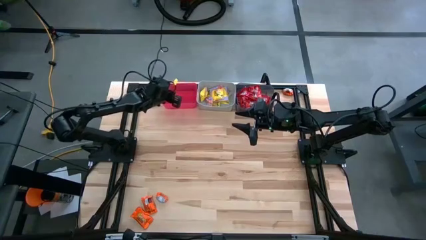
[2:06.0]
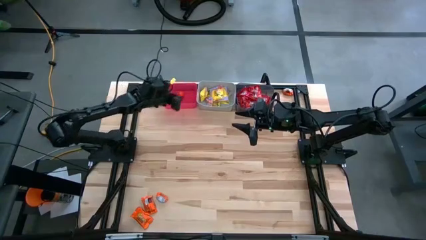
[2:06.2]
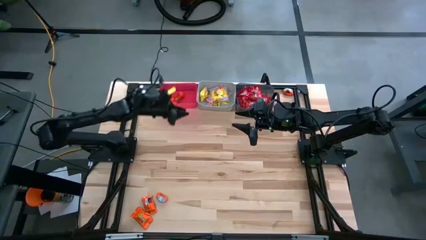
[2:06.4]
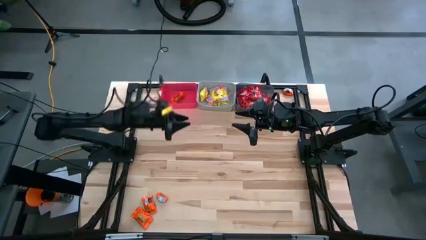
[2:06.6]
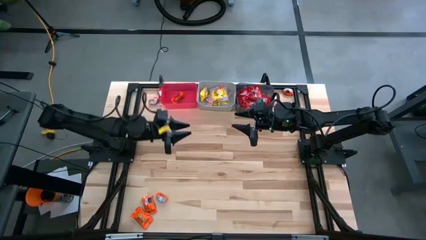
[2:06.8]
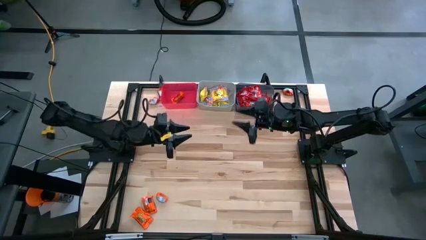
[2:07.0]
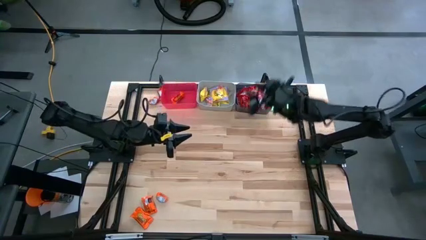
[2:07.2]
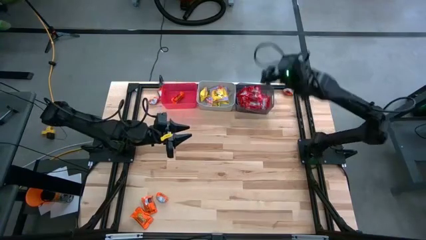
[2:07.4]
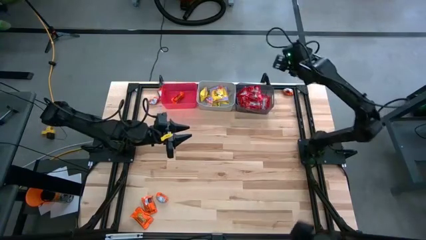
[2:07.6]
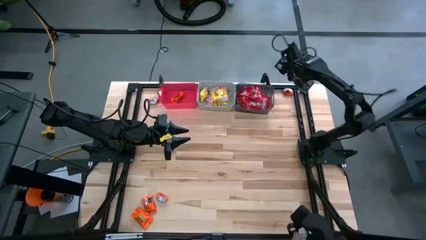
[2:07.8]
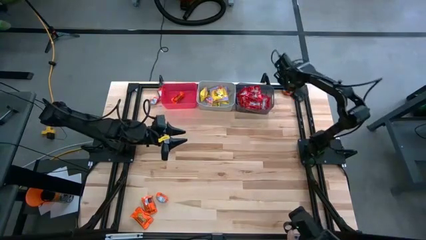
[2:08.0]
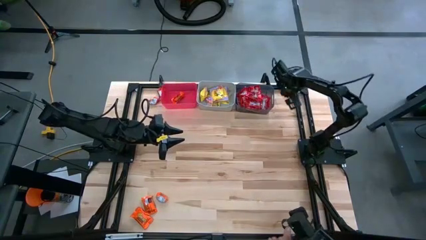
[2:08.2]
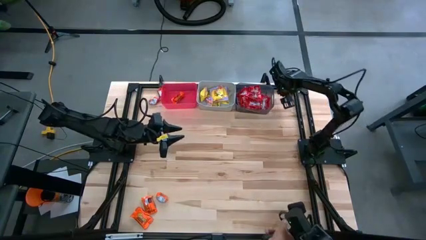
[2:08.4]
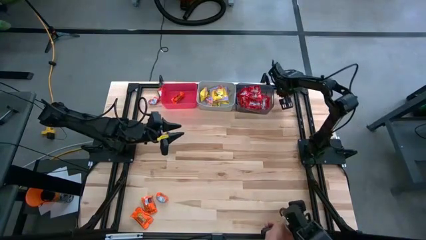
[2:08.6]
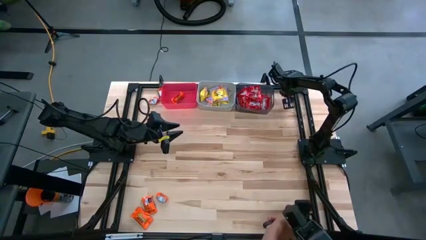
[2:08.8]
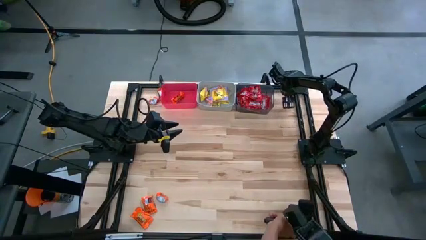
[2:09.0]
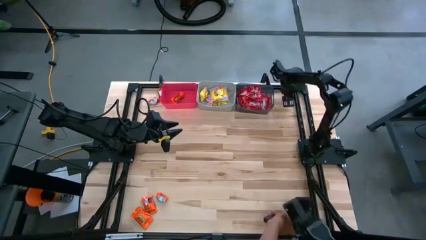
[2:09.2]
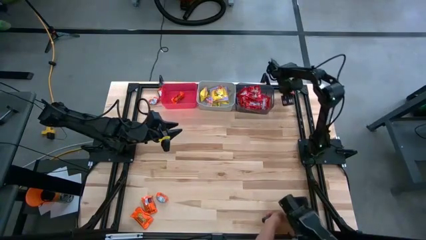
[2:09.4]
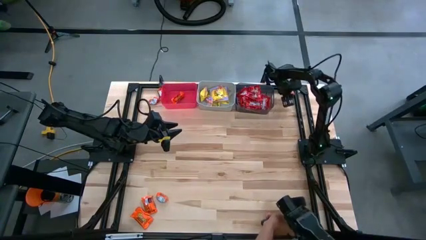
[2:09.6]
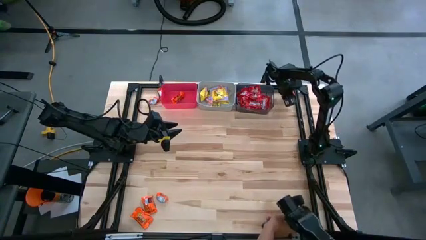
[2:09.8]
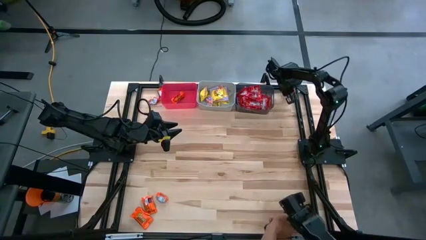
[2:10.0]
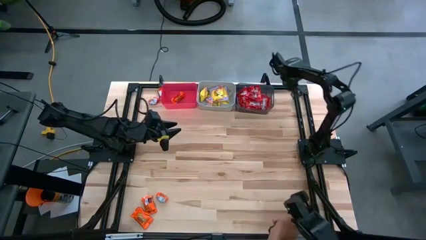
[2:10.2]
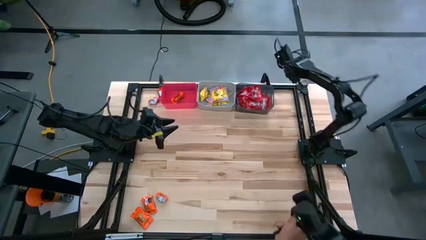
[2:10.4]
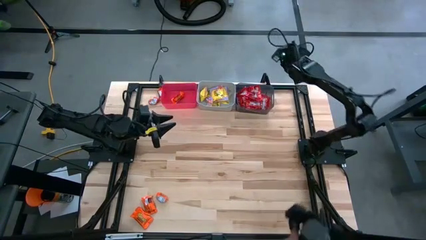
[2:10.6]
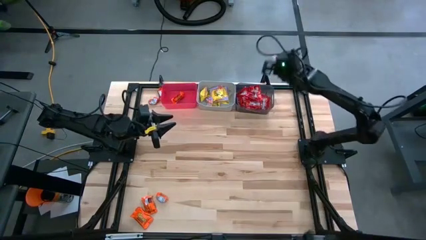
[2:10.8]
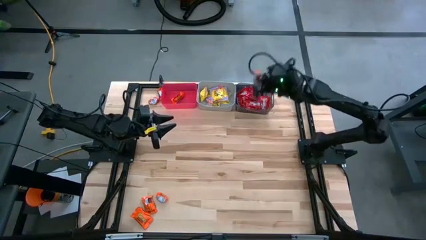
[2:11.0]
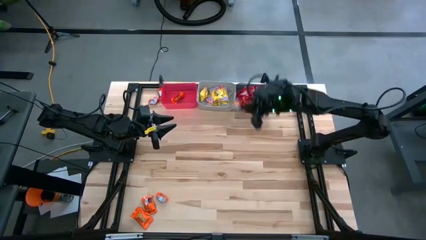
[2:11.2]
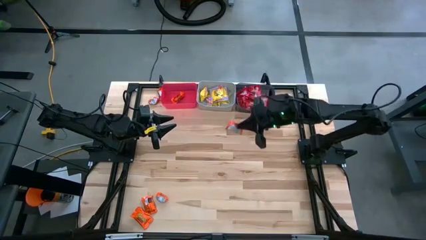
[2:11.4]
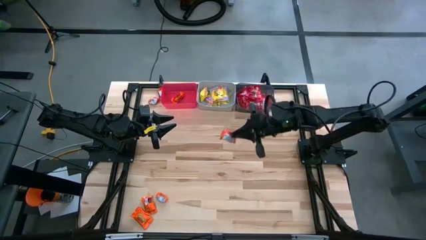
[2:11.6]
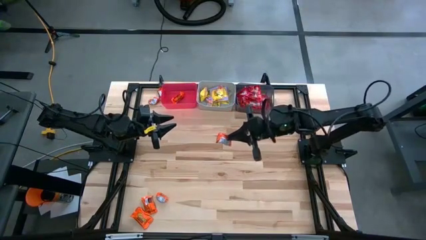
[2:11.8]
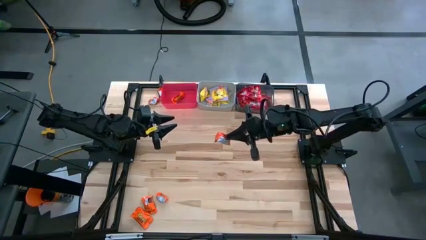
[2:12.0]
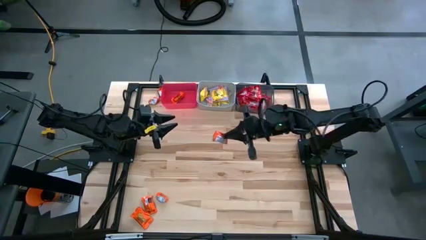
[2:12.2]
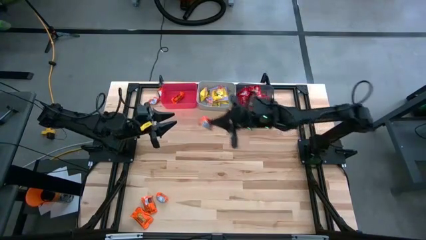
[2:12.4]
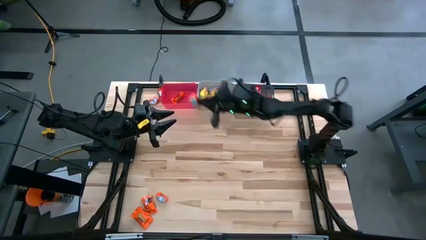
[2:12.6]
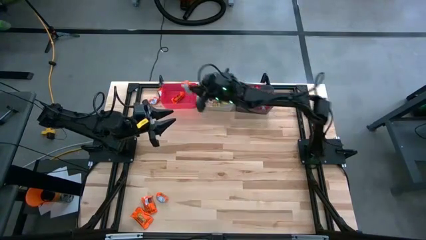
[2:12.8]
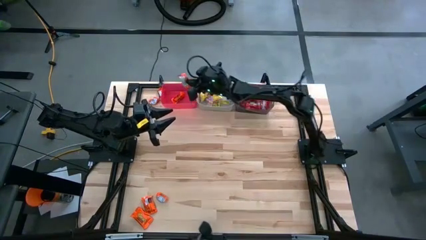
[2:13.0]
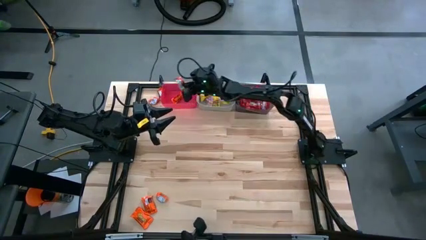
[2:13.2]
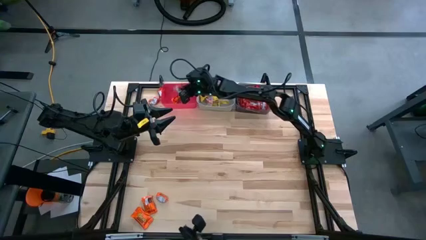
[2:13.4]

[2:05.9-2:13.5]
Task: Sort candy
Put the orange candy into the red bin

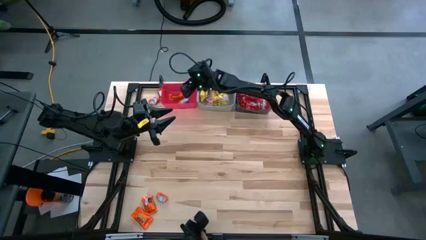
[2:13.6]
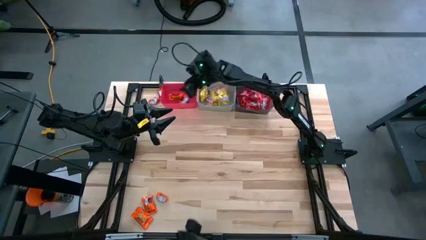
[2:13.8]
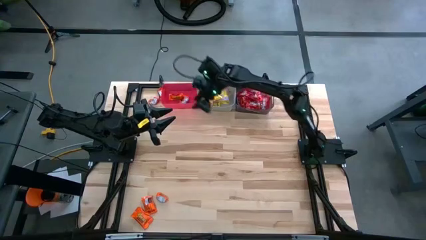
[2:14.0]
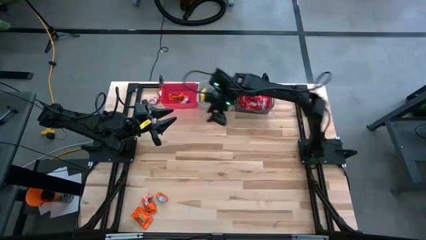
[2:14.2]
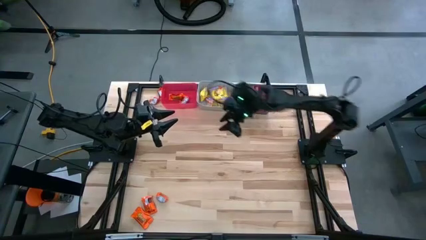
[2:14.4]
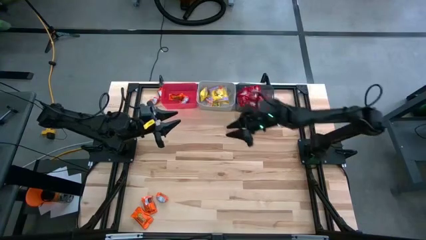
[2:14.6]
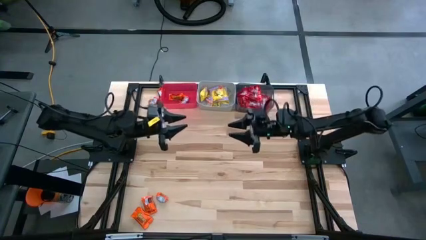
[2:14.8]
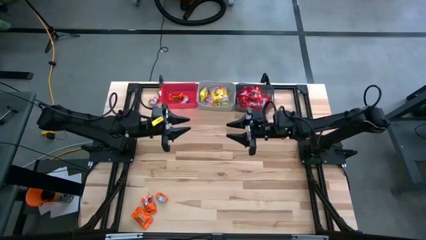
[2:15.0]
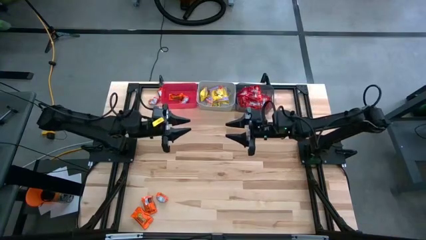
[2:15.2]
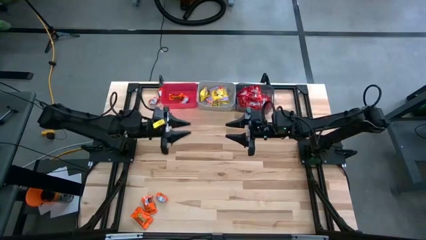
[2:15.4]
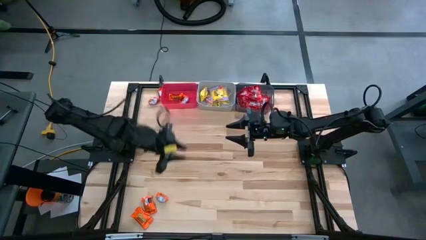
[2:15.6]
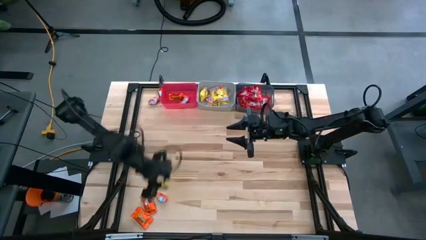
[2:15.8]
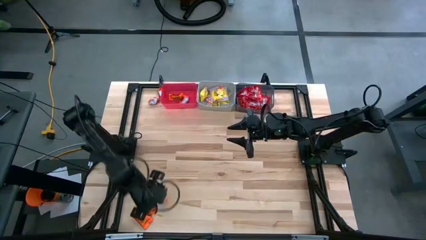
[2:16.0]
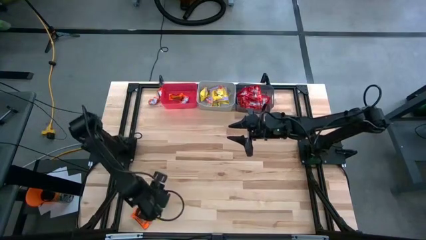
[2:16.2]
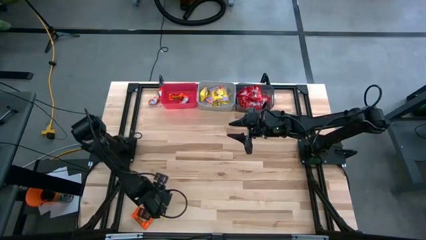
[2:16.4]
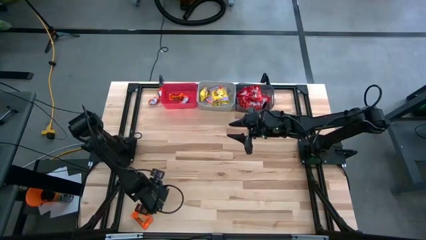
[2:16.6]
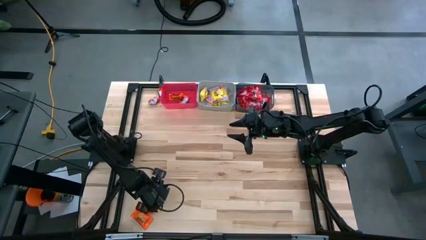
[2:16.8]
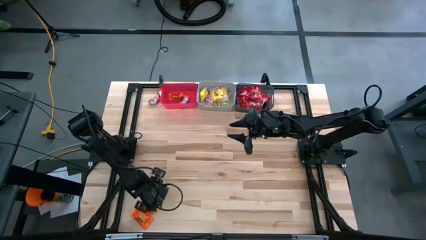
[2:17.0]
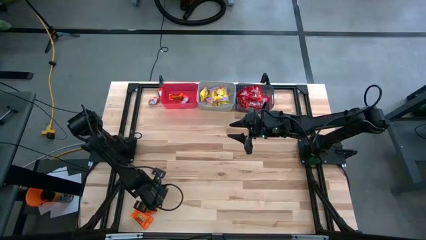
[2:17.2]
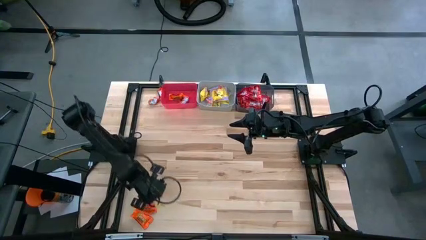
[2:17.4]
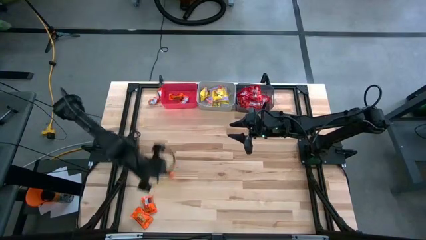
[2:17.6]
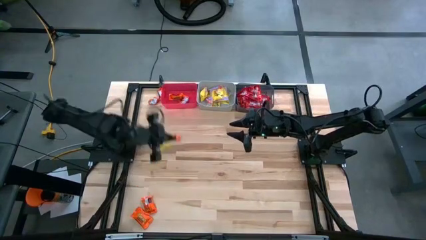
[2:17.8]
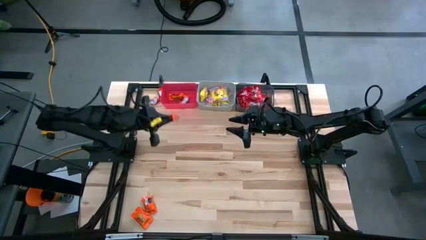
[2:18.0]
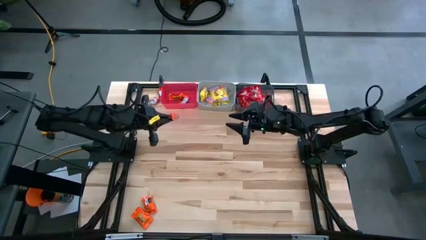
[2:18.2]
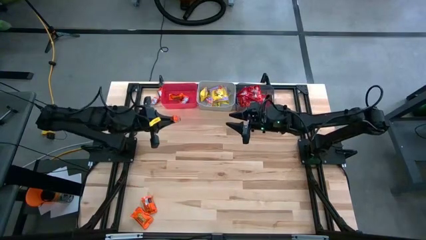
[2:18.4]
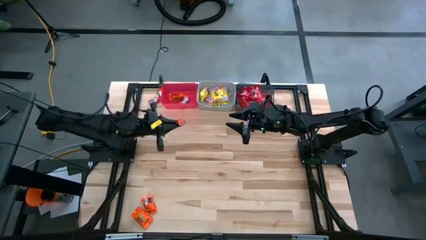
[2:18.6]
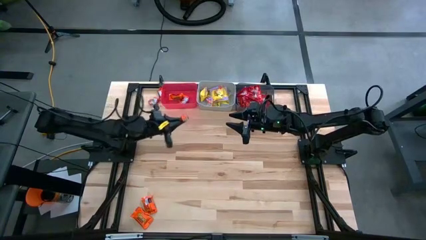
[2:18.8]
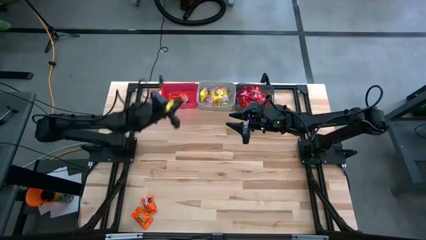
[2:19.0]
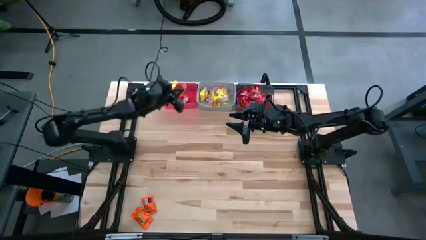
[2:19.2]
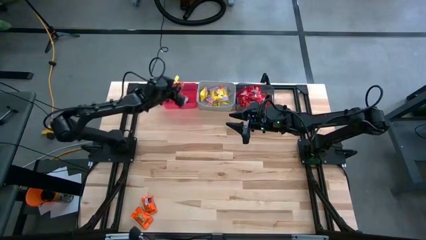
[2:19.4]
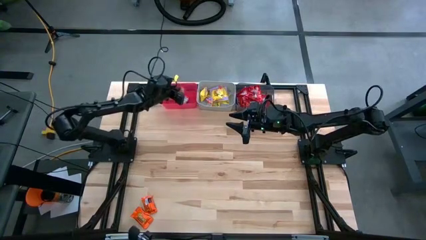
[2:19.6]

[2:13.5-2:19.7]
Put the orange candy into the red bin

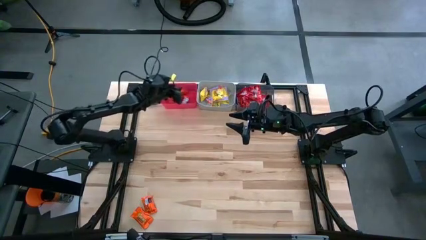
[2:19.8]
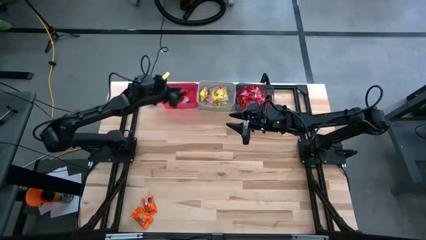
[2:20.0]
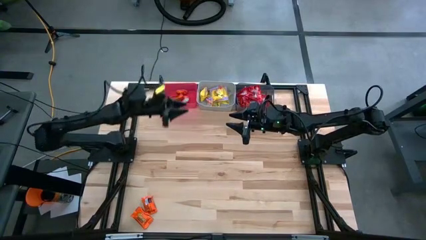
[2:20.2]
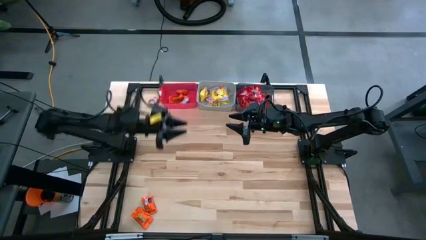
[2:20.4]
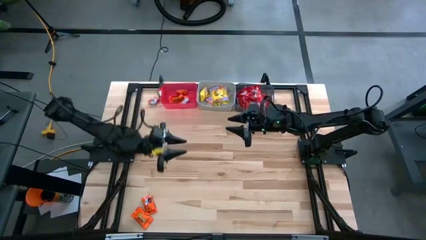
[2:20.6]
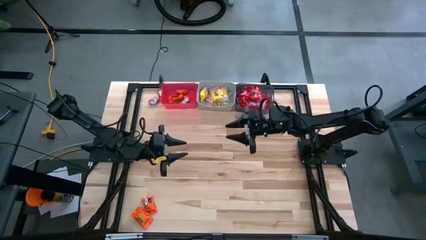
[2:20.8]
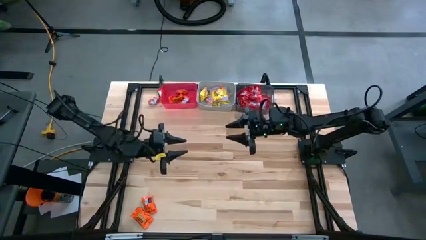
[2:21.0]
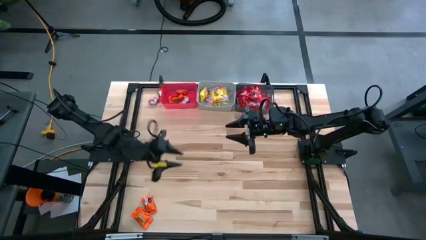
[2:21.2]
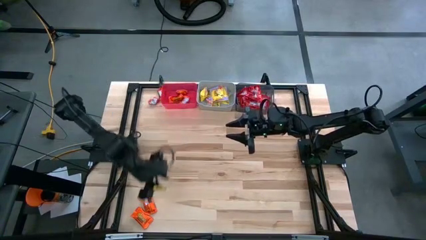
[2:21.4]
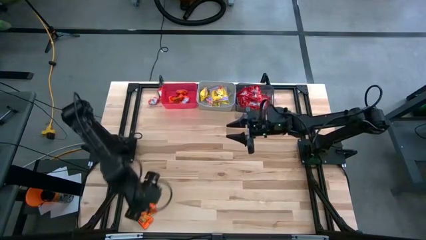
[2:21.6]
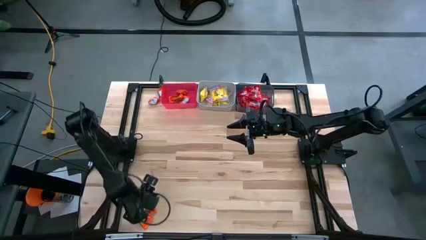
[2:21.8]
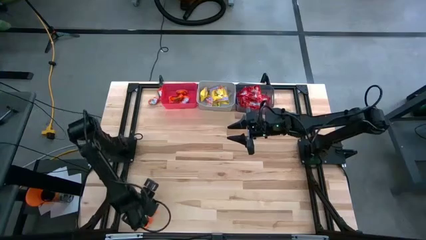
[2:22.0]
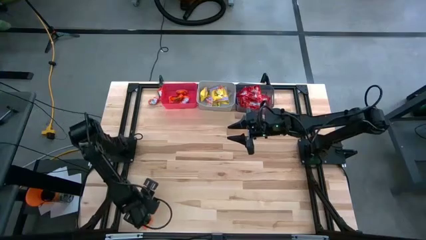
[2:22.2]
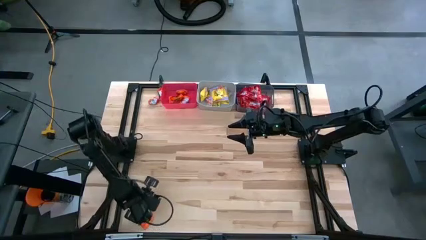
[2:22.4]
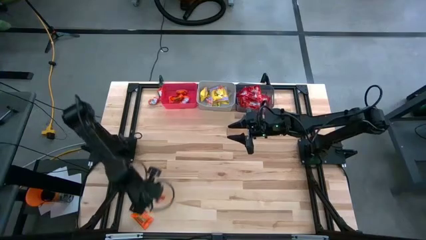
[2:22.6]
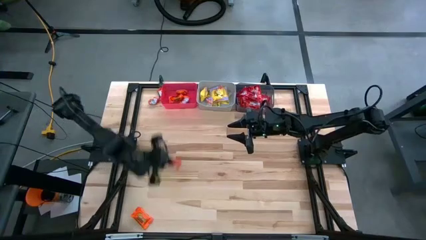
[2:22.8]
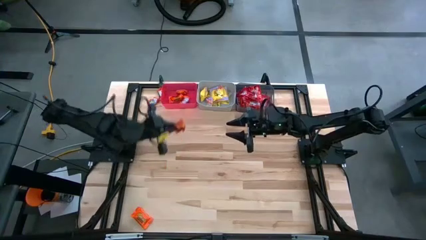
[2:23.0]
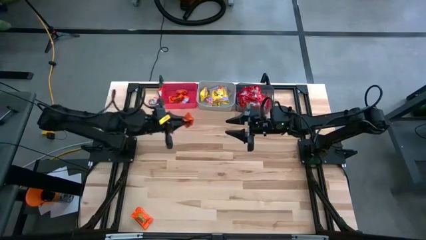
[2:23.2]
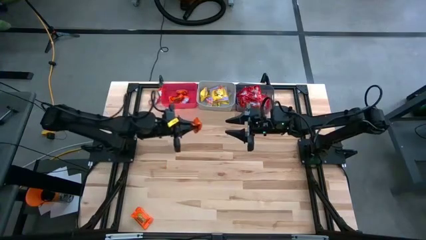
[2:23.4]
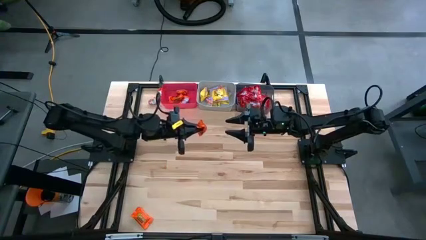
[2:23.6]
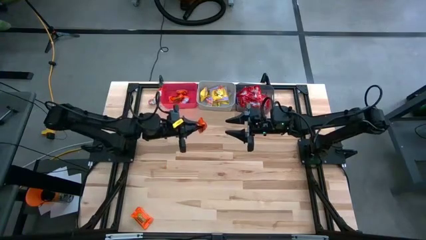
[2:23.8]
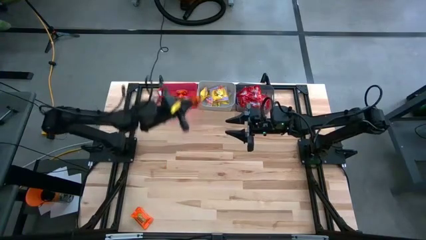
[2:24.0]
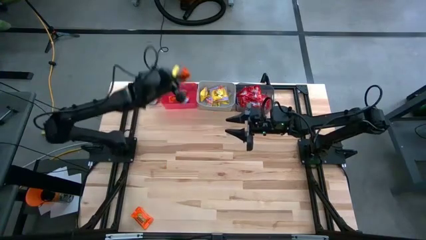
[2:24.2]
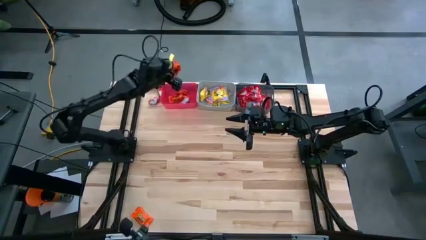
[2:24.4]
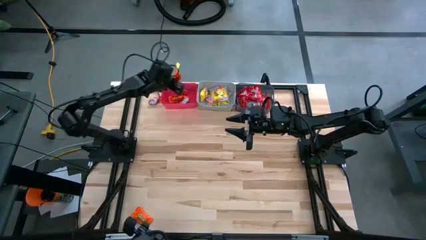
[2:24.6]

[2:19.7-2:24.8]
Put the orange candy into the red bin
